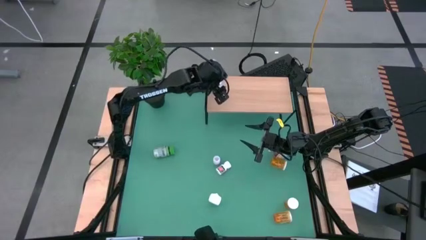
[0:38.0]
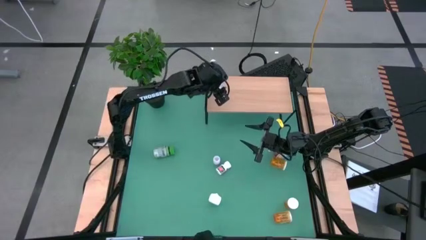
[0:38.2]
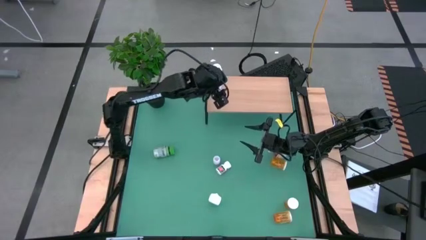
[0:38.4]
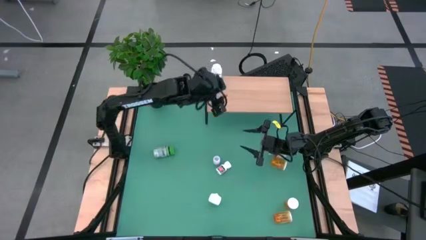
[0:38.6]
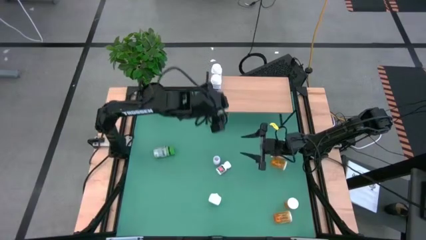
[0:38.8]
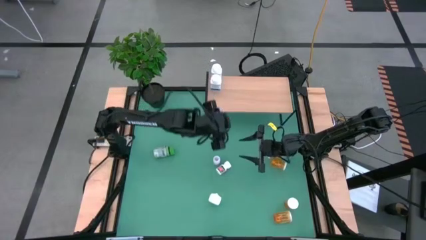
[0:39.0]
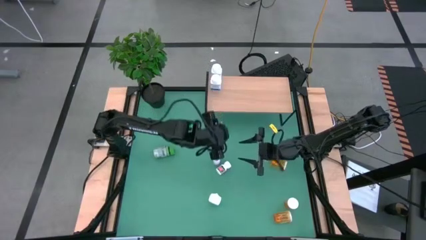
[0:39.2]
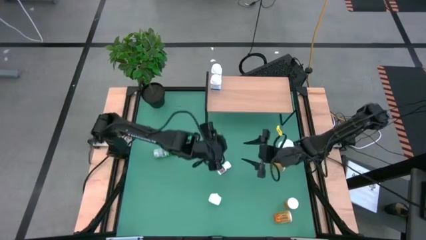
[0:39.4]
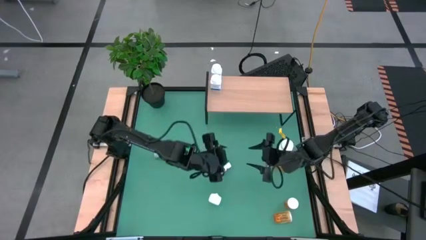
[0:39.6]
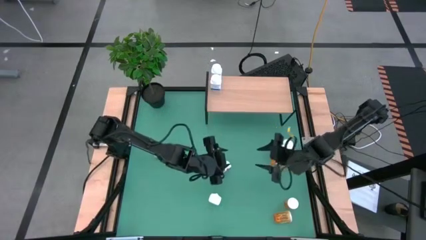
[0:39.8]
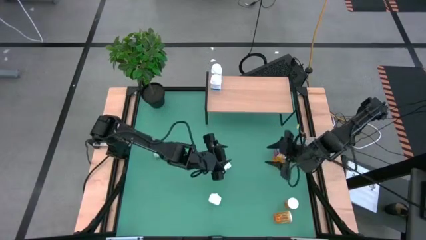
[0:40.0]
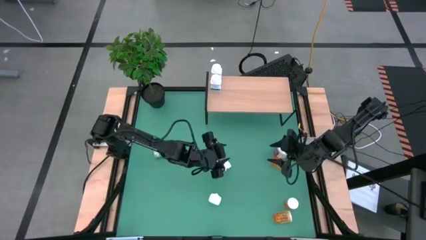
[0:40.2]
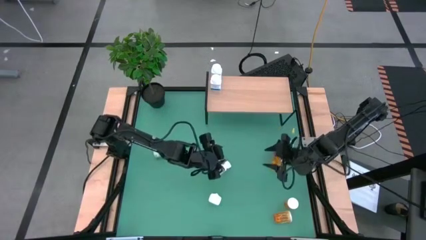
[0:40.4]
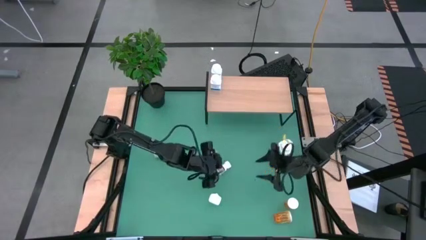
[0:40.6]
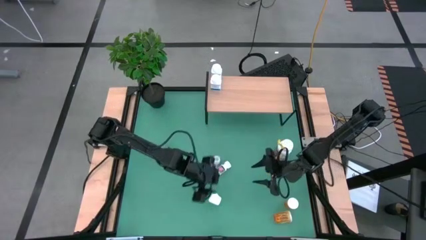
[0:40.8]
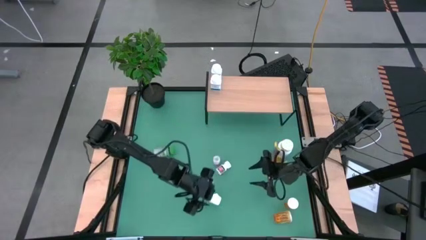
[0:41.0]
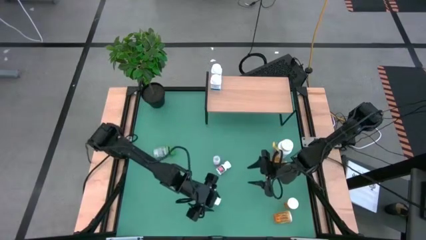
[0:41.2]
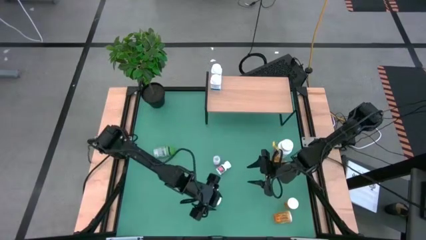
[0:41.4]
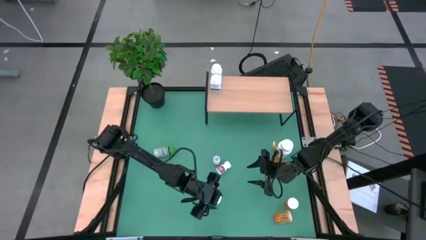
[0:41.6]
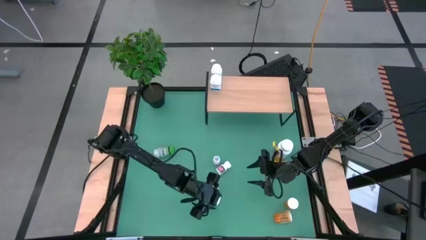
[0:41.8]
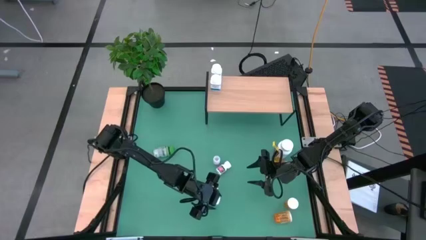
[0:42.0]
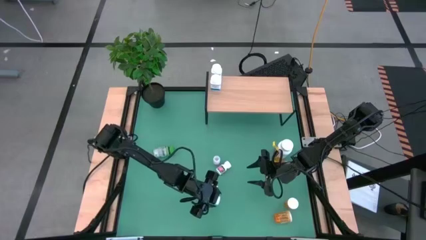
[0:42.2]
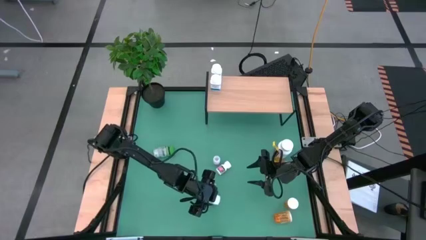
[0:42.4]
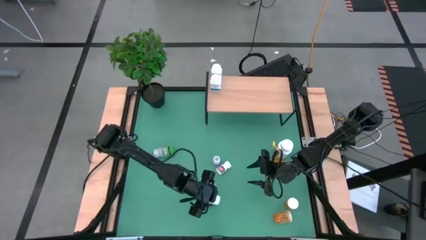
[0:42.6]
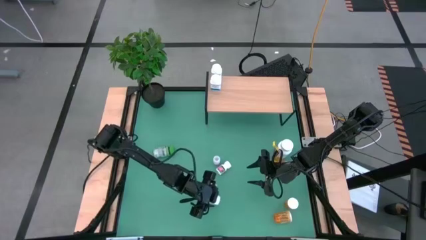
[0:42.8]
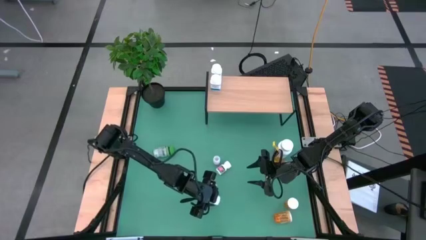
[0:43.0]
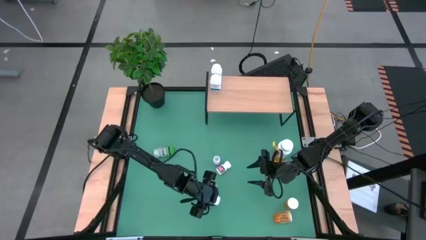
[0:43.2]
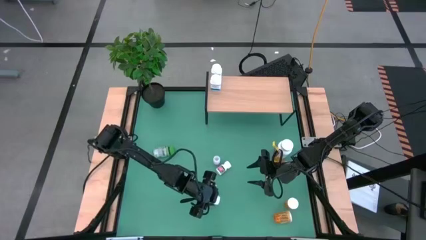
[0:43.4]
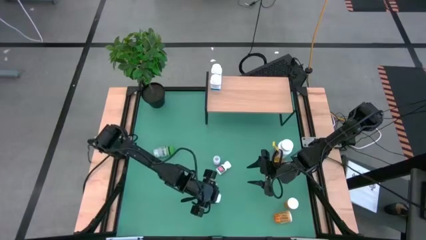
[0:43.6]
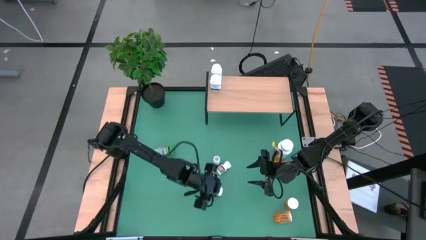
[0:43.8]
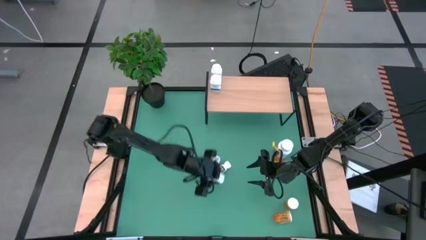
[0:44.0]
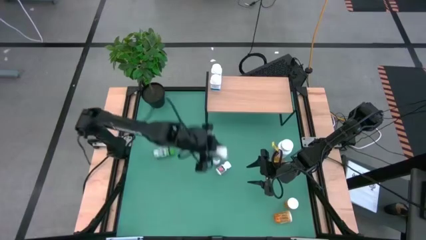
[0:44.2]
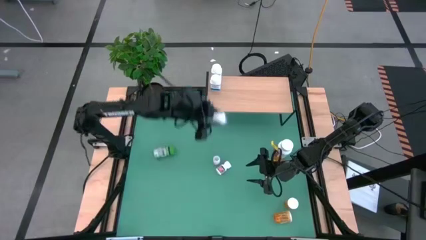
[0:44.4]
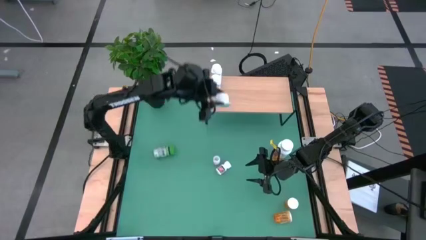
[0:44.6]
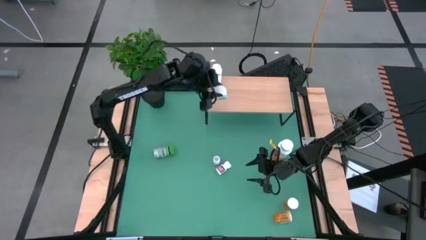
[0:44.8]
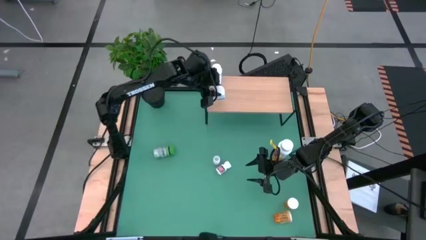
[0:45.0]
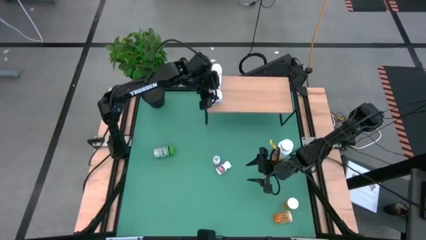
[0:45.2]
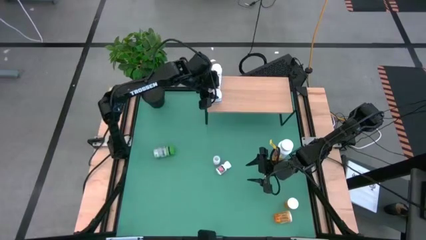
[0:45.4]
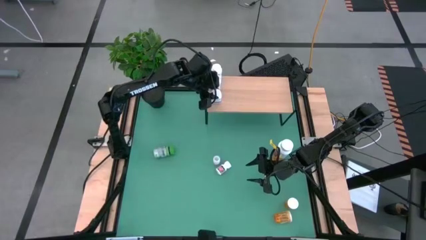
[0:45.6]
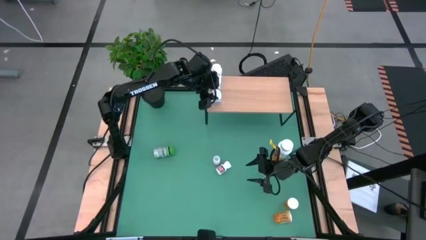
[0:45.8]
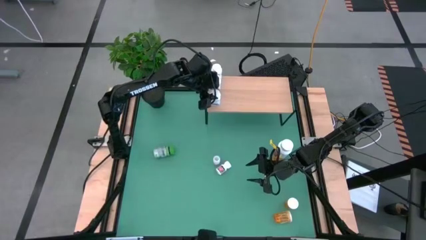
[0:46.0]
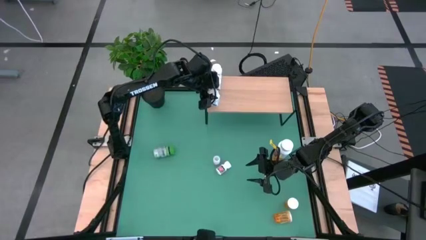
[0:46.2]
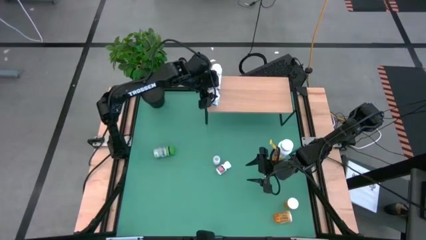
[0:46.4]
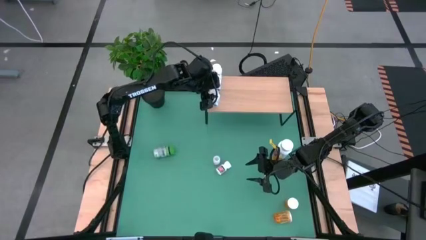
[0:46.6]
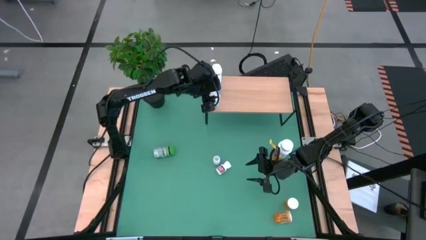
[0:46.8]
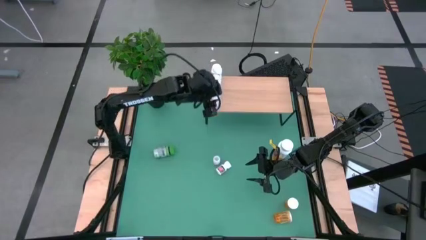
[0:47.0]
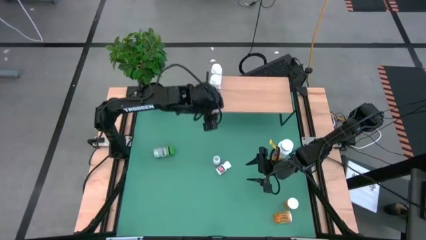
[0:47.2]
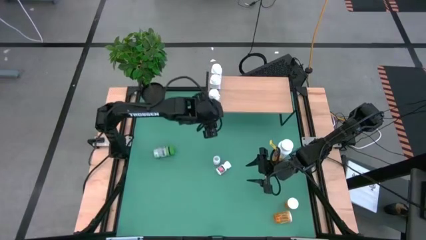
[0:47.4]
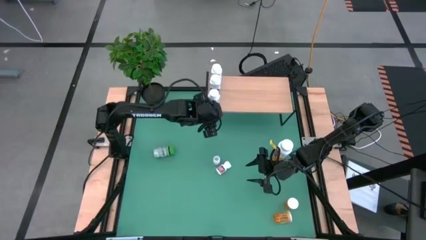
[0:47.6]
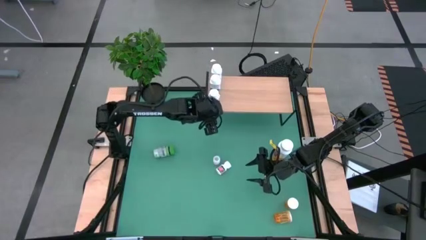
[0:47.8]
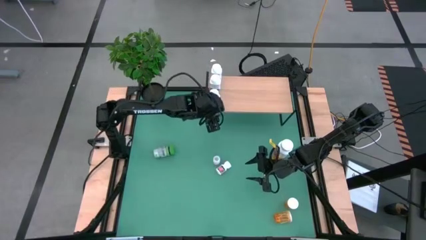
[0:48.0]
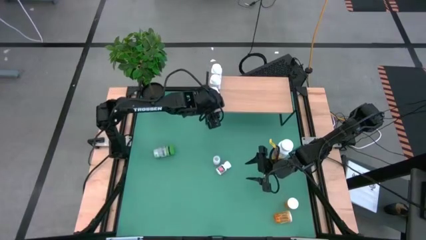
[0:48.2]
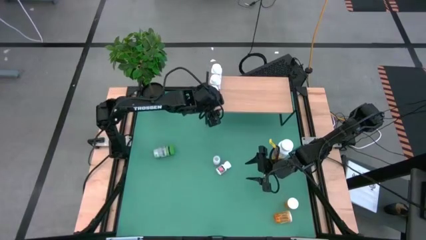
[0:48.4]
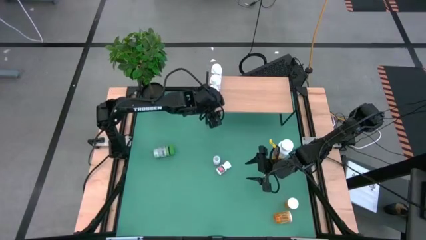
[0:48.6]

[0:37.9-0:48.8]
Task: Pick and place medicine bottles onto shelf by color
Align the white and blue pill bottle with the other white and blue pill bottle on the shelf
